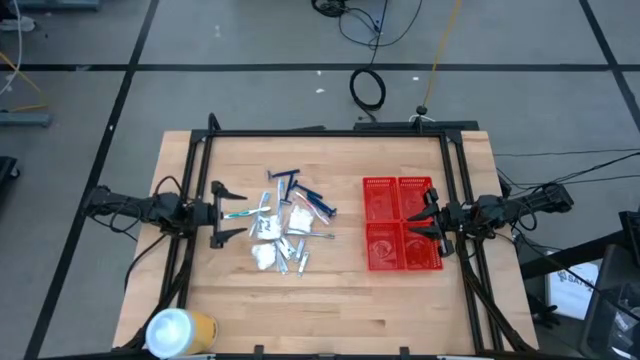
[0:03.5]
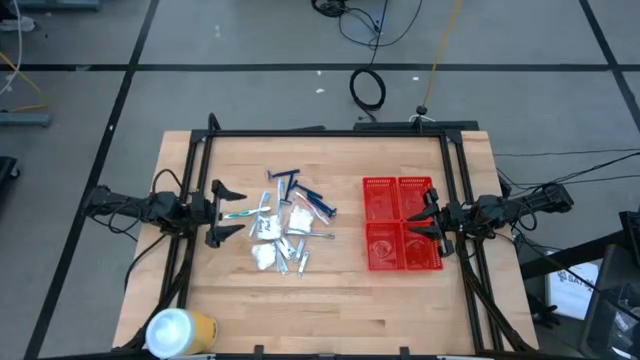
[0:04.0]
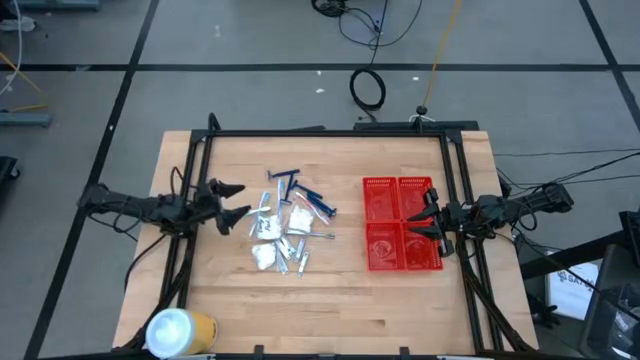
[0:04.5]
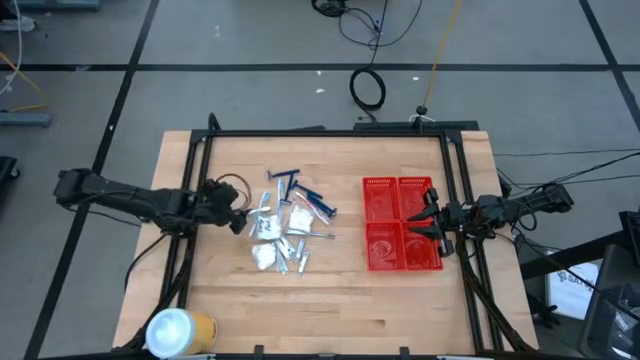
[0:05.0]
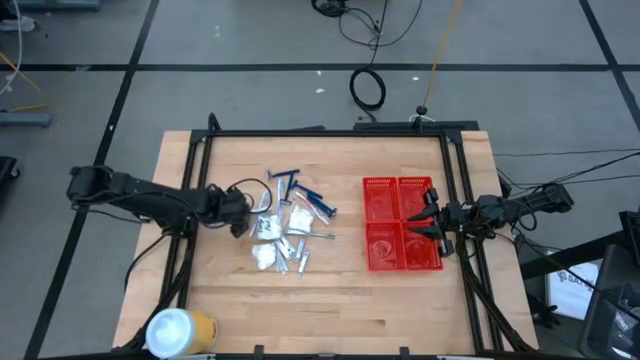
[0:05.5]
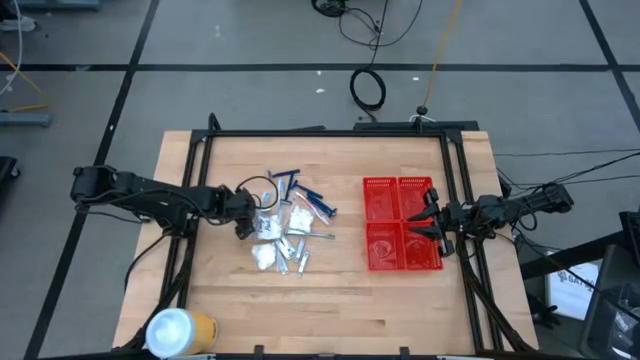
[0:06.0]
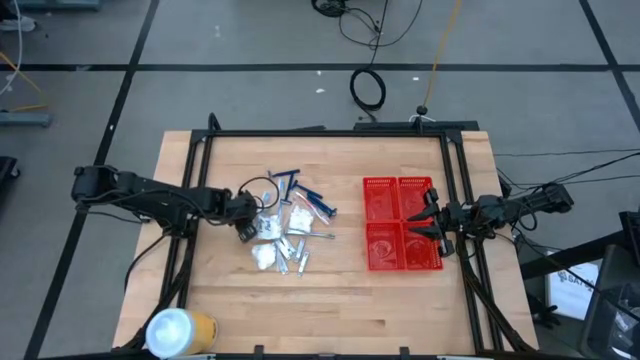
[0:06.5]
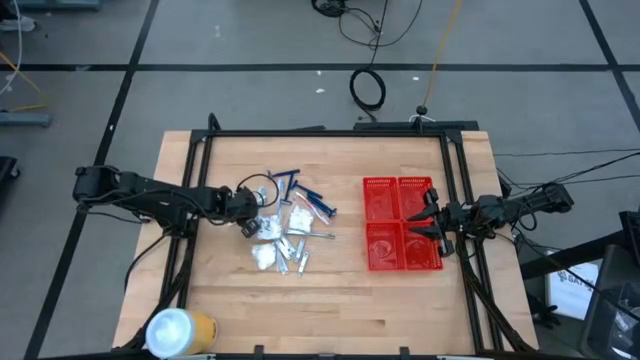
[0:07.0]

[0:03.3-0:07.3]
Task: Pick & Place Travel size toiletries
Put the green toothbrush into the top right red bin

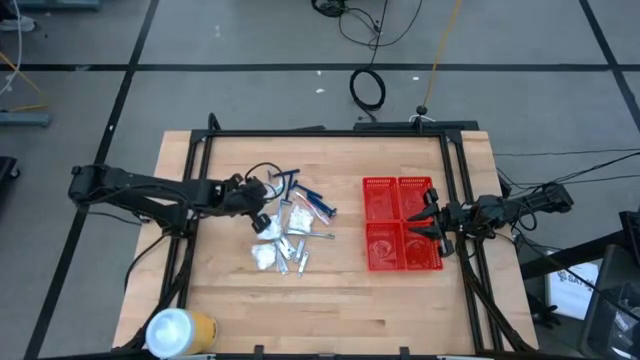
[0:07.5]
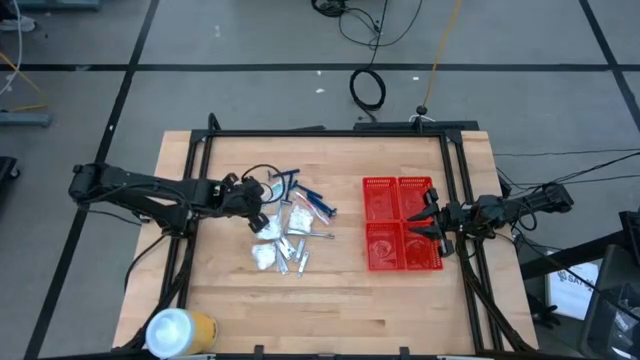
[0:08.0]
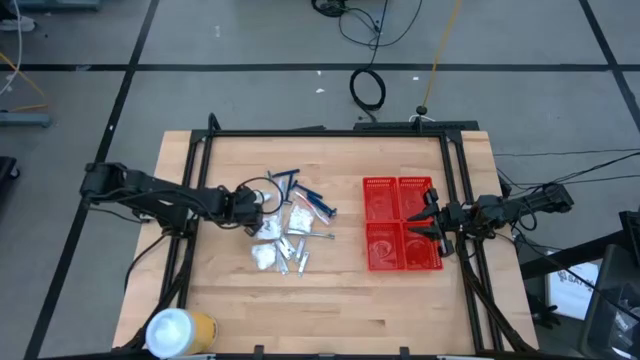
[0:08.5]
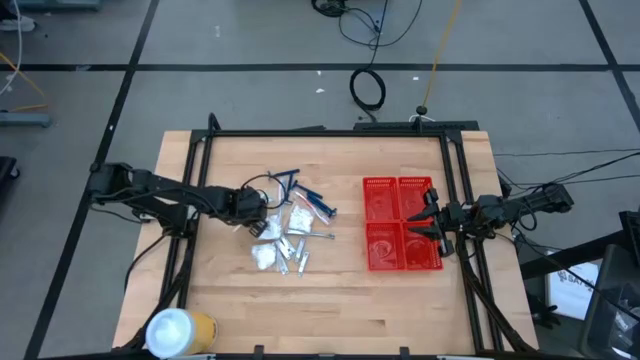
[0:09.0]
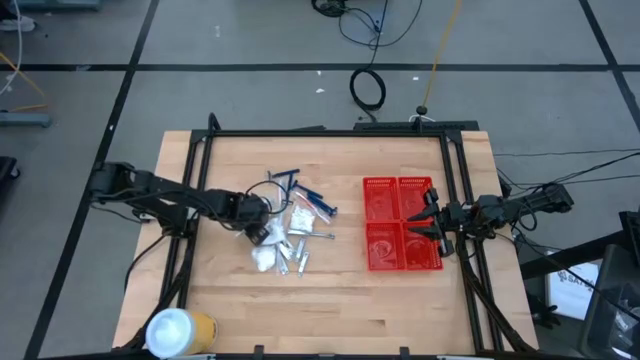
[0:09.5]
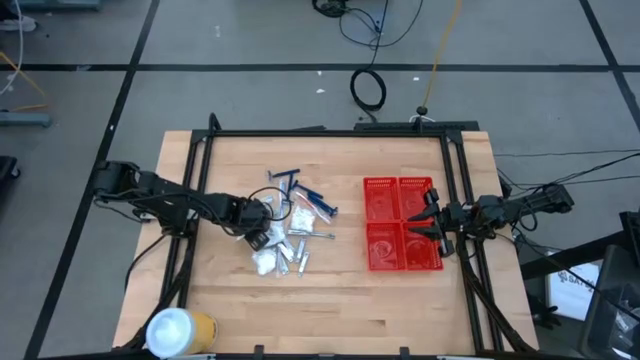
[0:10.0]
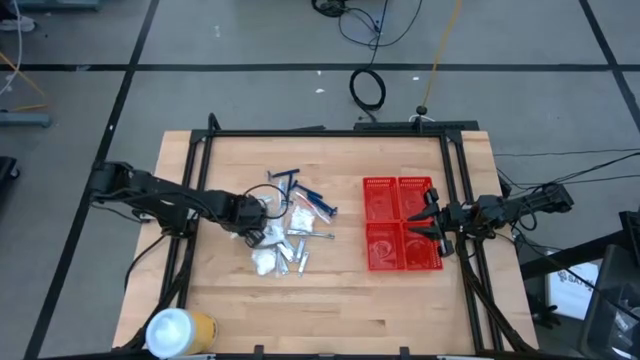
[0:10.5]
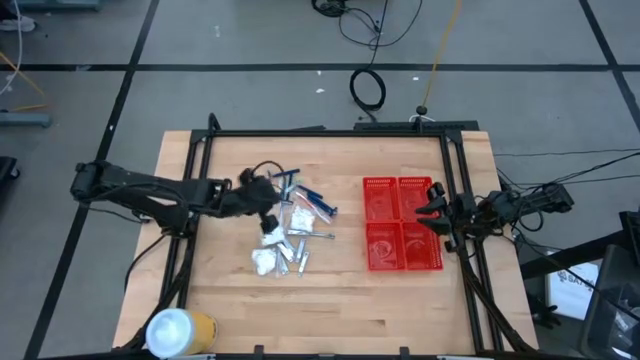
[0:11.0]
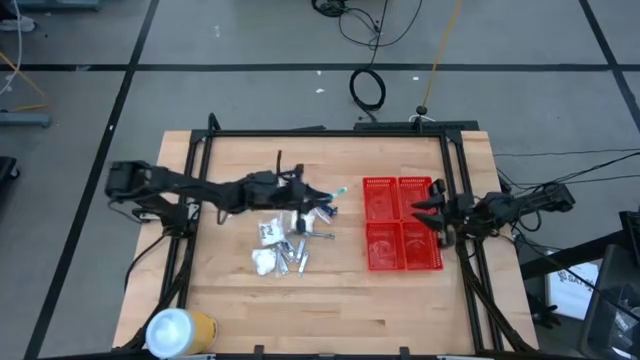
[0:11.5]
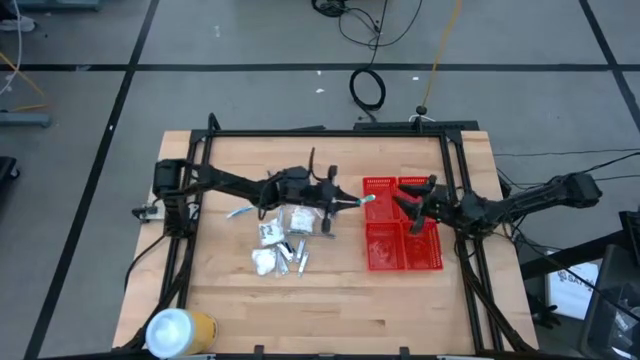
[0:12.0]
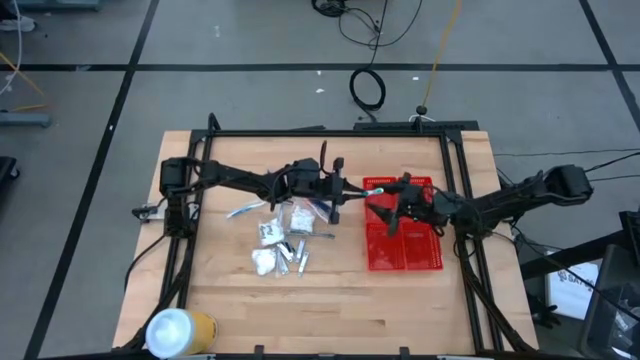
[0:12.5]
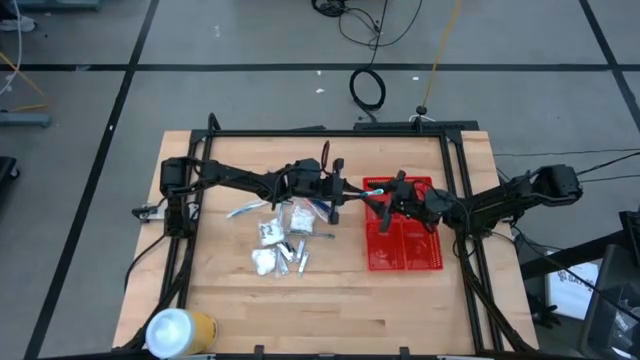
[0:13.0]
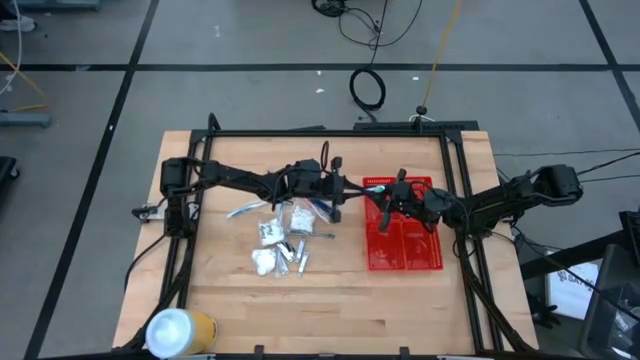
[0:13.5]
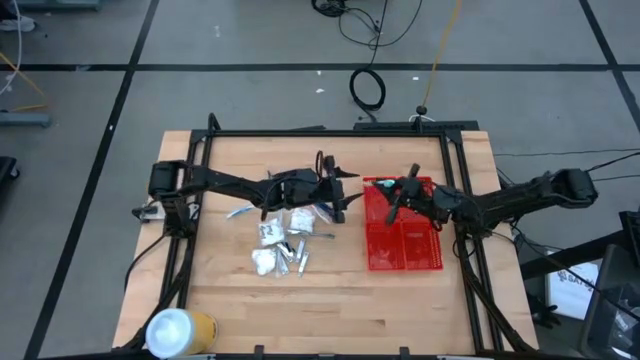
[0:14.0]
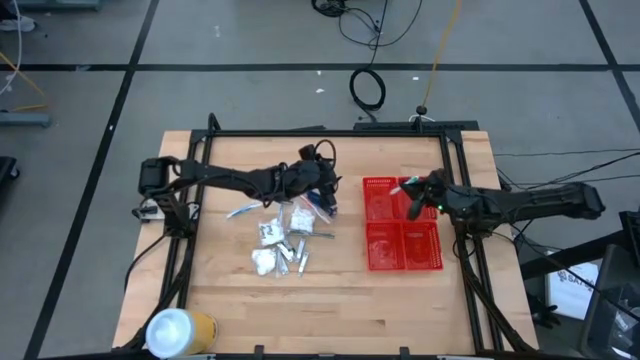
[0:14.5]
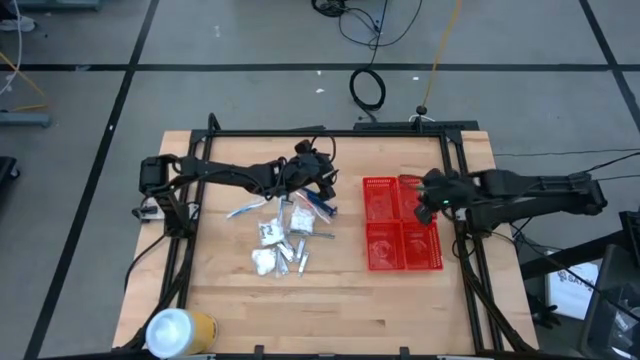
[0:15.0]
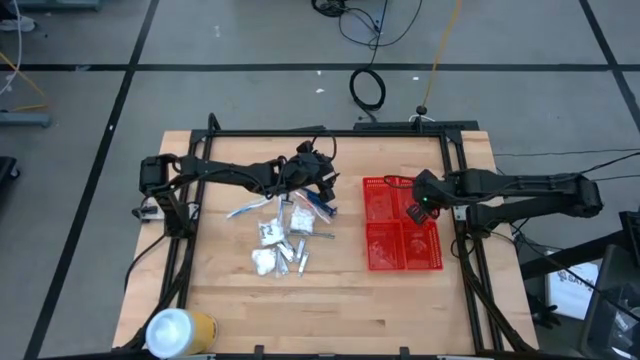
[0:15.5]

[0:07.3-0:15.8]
Put the green toothbrush into the top right red bin

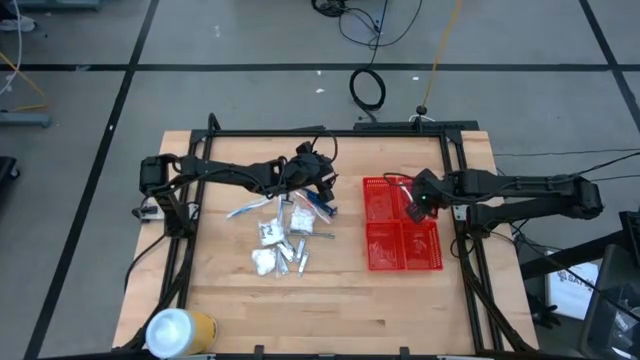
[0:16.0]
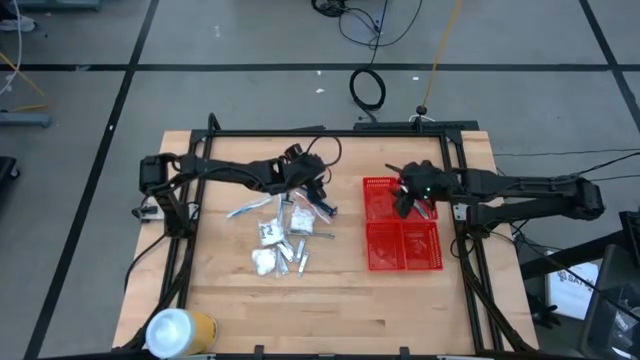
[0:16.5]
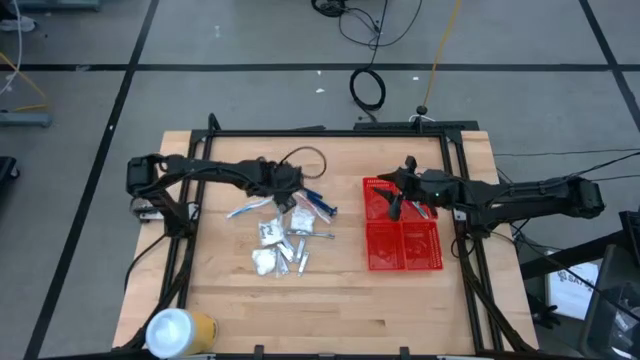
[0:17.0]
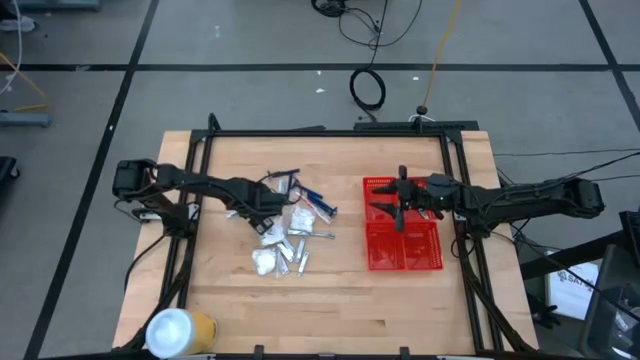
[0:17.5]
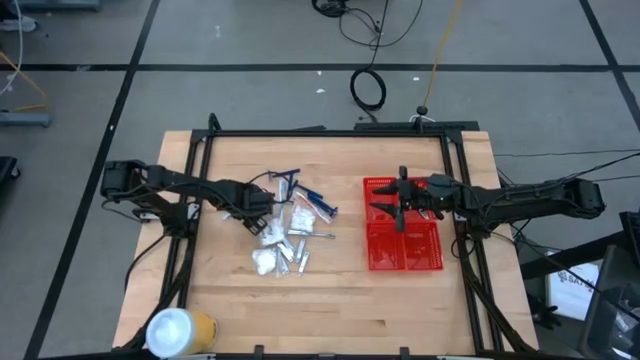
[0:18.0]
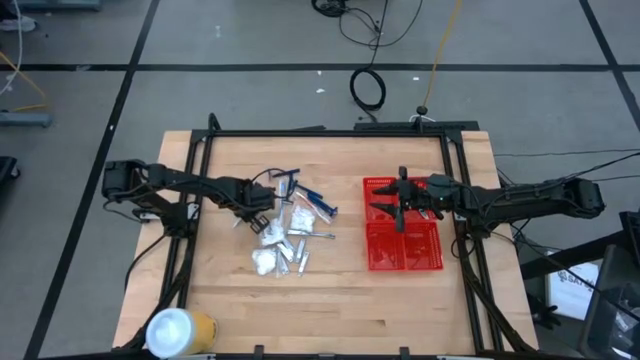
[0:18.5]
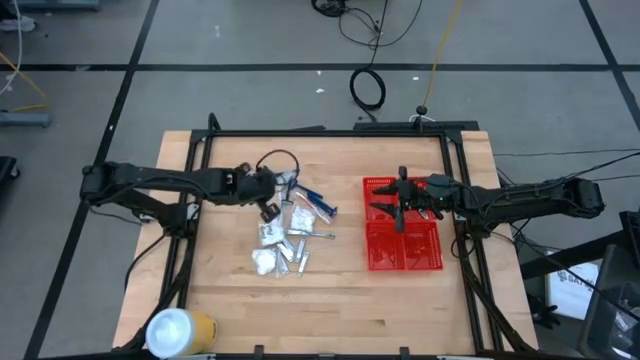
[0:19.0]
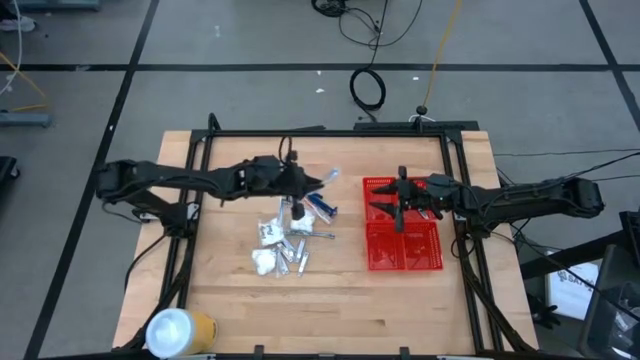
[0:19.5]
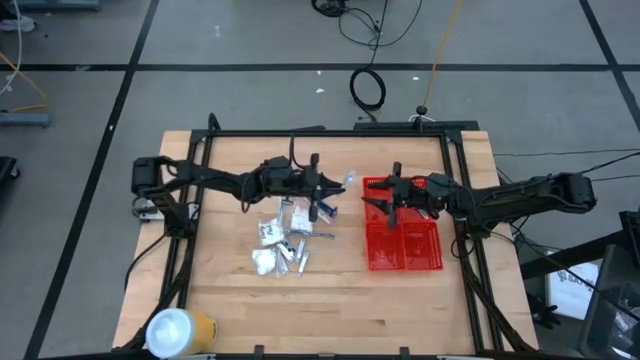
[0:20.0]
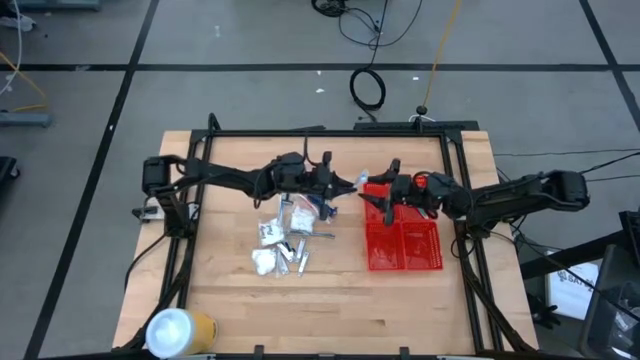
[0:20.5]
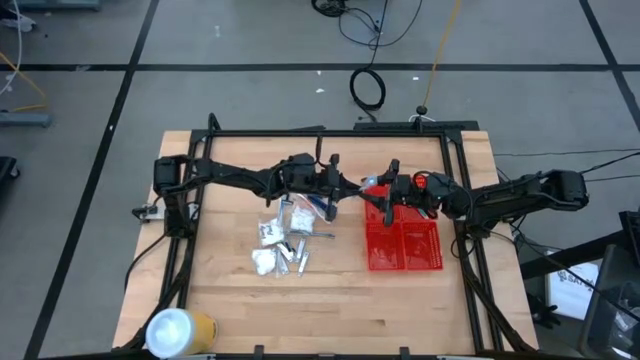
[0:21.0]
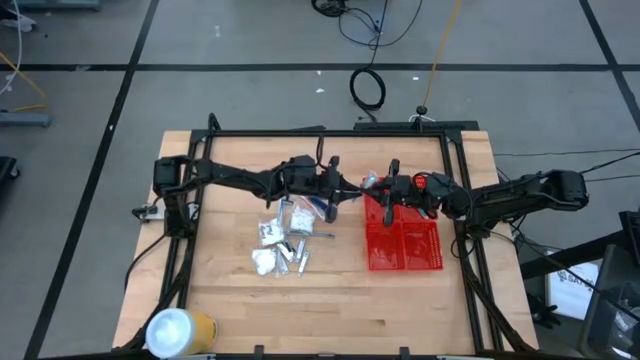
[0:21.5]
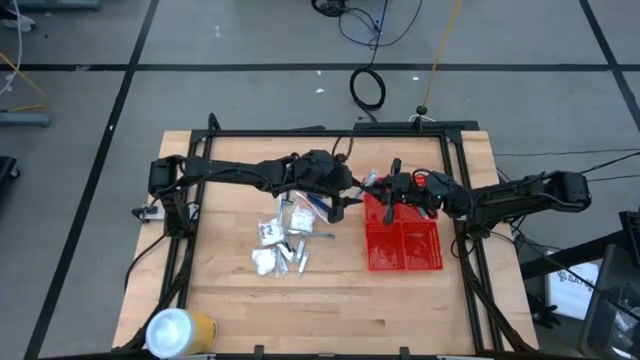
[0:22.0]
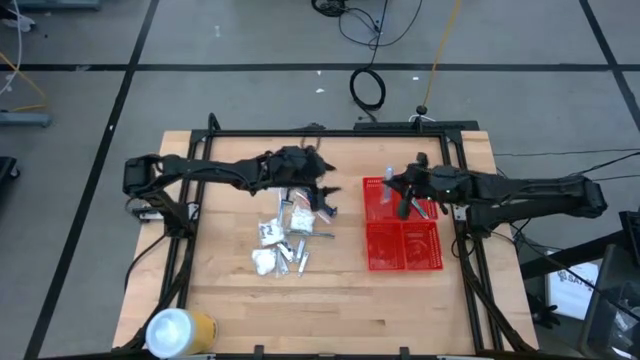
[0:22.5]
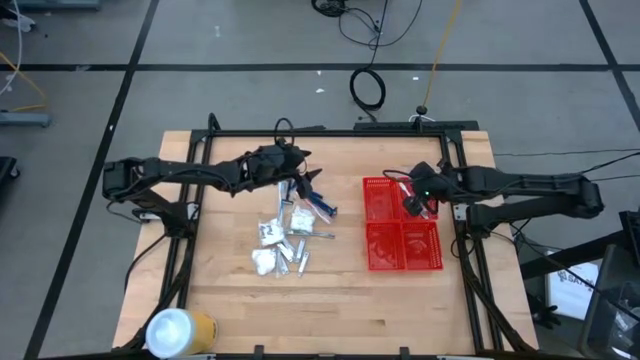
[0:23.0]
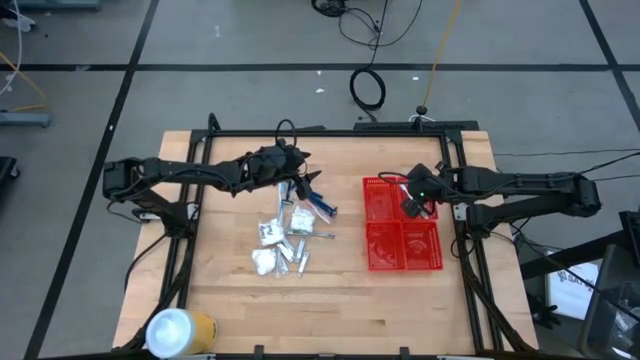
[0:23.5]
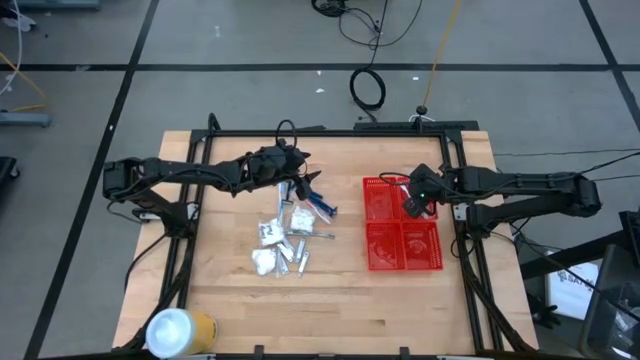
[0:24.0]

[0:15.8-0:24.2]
Put the blue toothbrush into the top right red bin

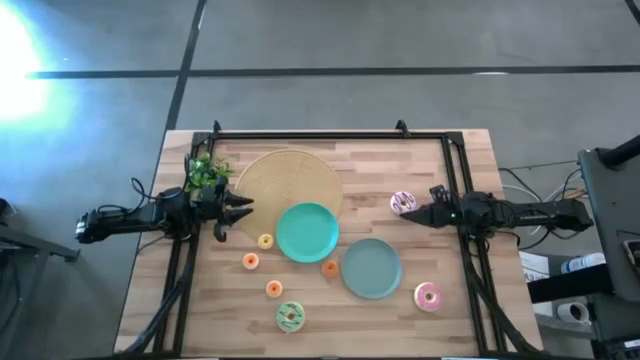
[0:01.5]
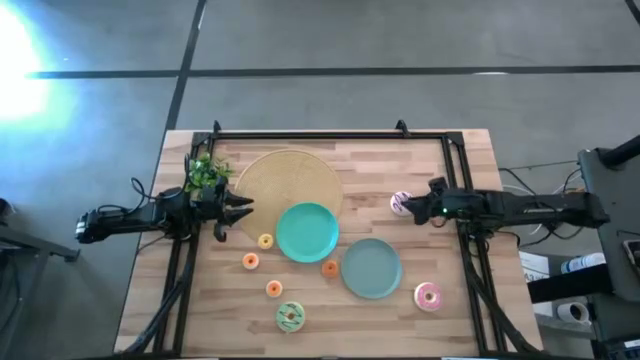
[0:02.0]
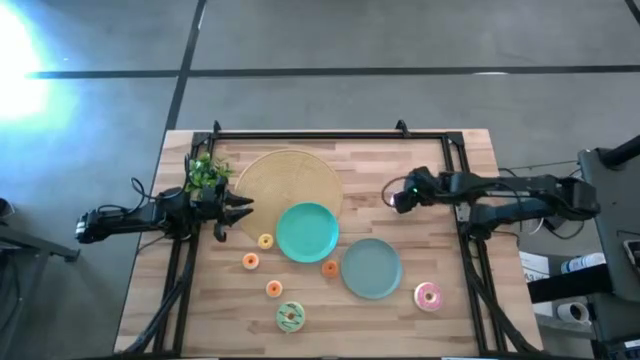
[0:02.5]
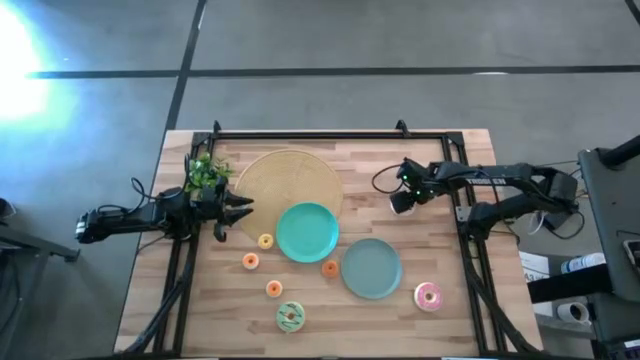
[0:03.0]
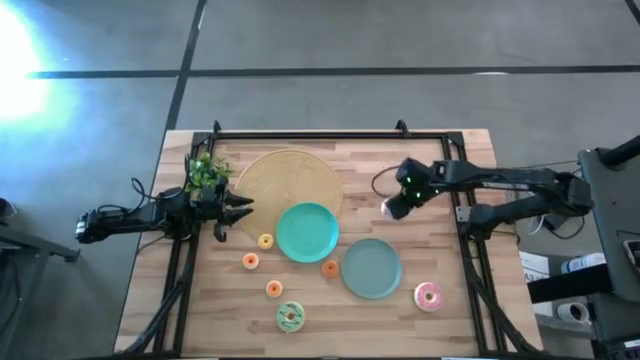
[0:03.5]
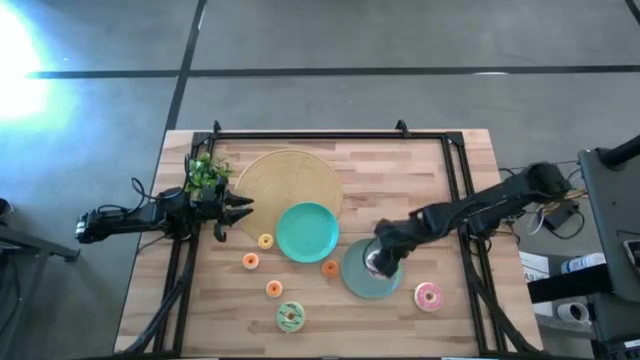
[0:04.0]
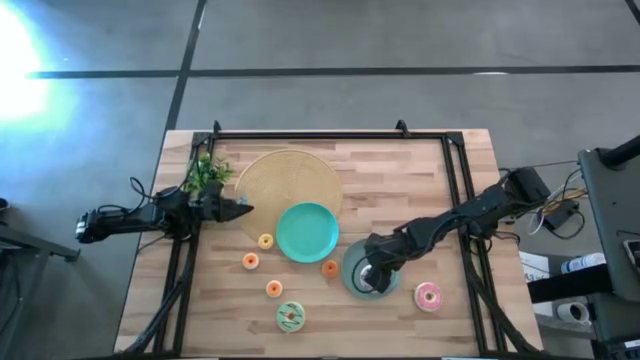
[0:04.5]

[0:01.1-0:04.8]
Task: Pick & Place donuts
Put the big purple doughnut on the green plate
